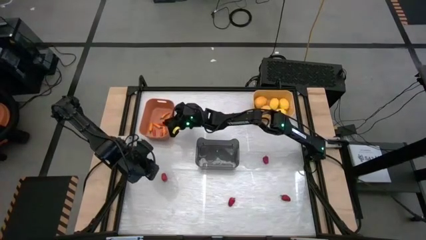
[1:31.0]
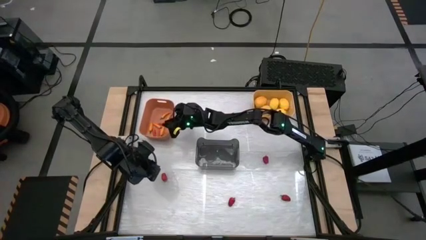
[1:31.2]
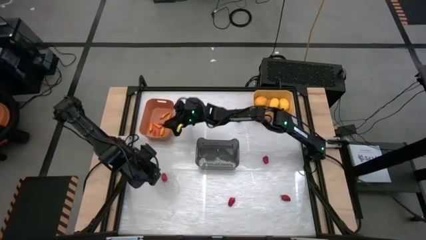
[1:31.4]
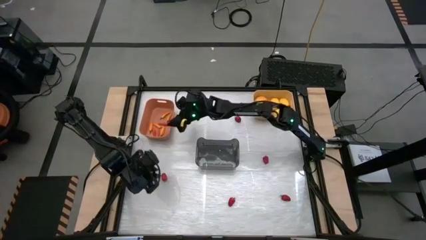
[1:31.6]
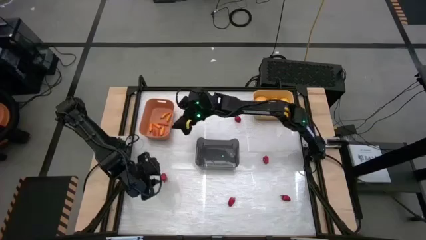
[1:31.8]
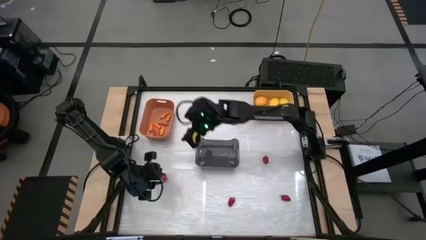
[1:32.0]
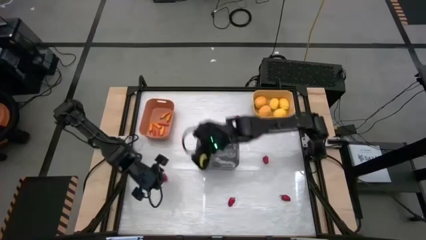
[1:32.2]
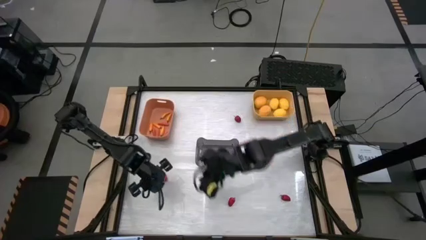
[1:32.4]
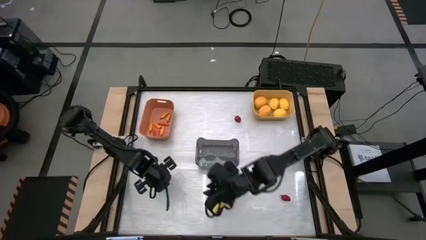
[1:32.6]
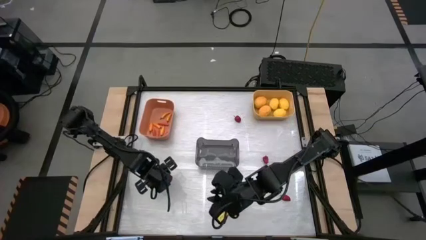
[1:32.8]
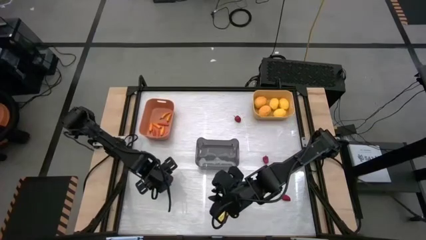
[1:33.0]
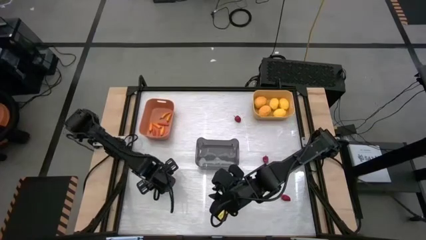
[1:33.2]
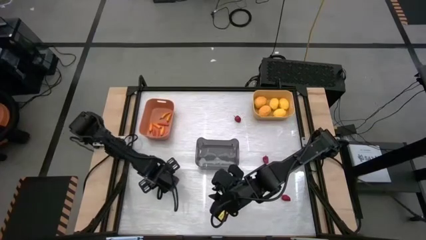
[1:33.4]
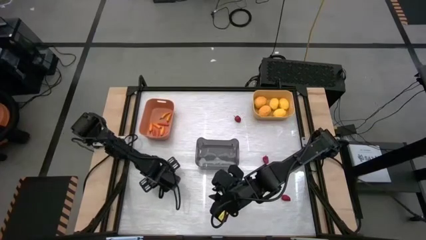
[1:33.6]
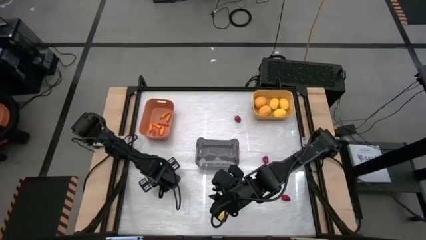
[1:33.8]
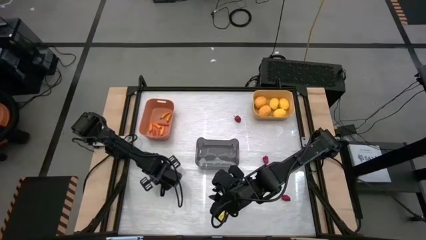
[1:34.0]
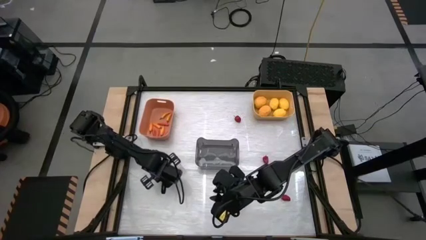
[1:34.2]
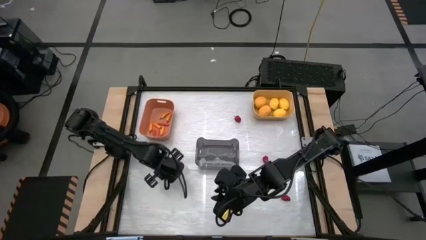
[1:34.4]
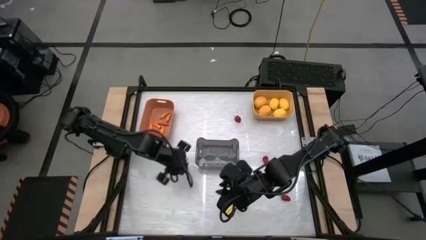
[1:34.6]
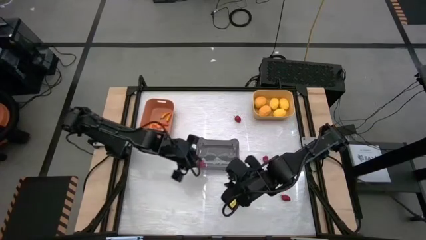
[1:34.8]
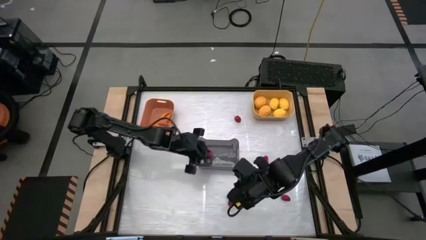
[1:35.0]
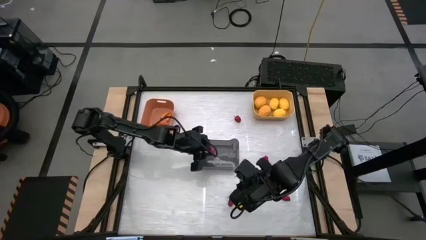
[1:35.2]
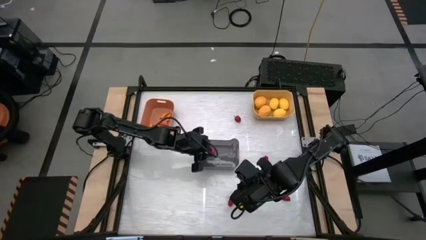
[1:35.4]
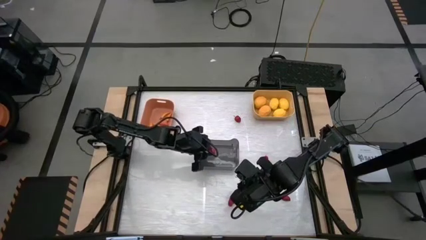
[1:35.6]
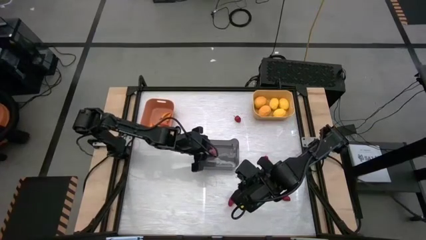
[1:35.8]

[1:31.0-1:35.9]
Task: Sort produce into baskets
Put the red bell pepper into the gray bin

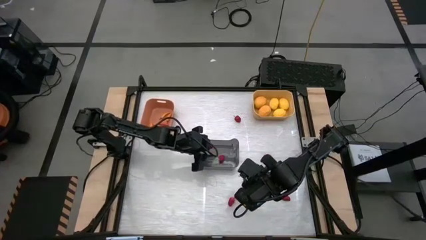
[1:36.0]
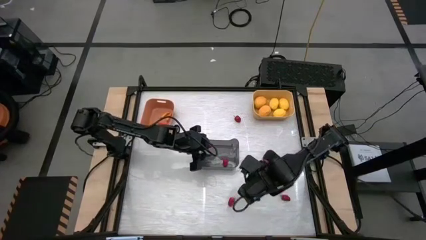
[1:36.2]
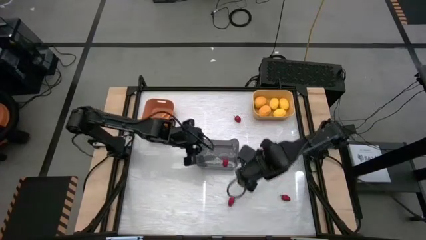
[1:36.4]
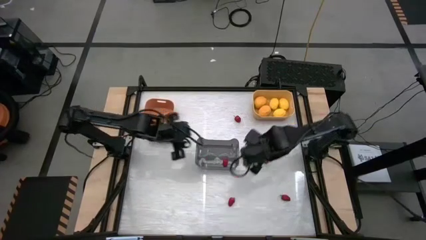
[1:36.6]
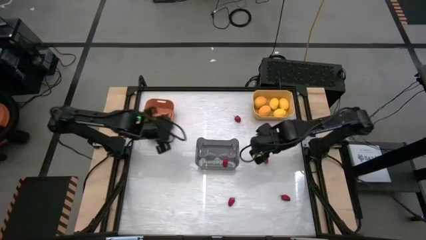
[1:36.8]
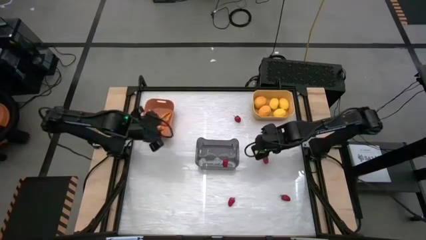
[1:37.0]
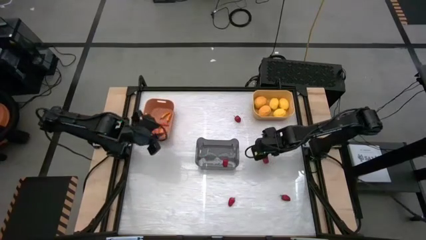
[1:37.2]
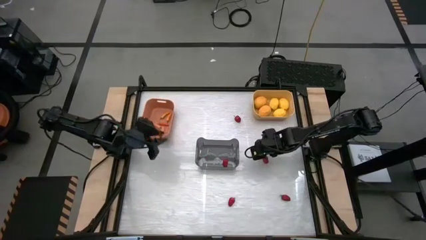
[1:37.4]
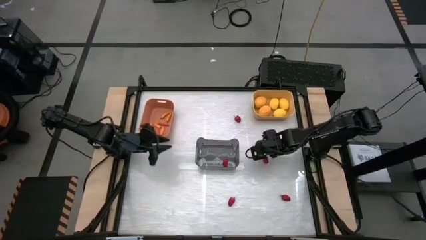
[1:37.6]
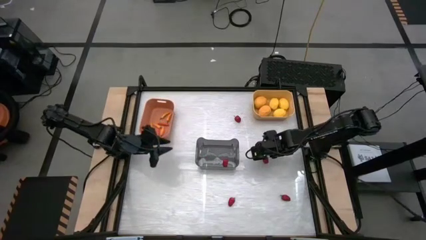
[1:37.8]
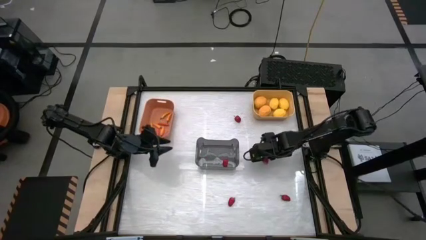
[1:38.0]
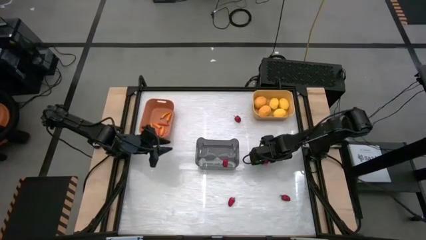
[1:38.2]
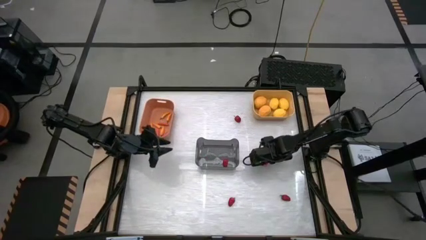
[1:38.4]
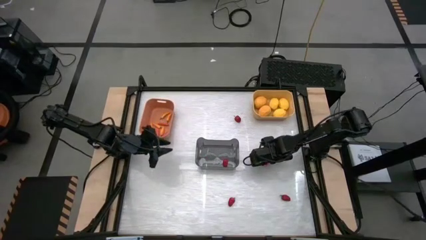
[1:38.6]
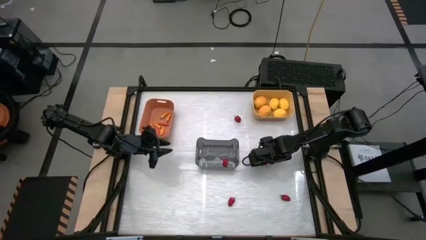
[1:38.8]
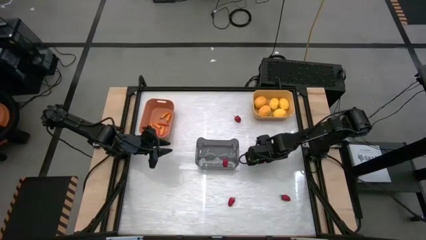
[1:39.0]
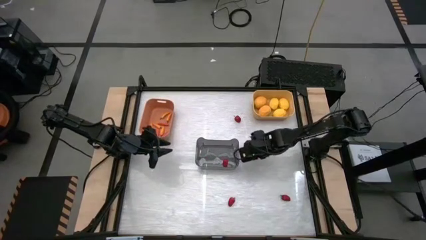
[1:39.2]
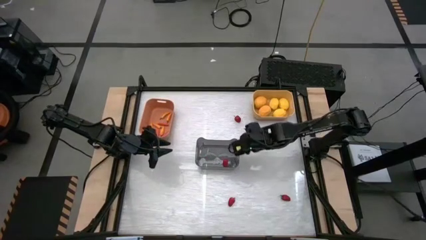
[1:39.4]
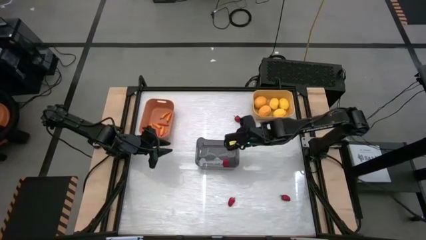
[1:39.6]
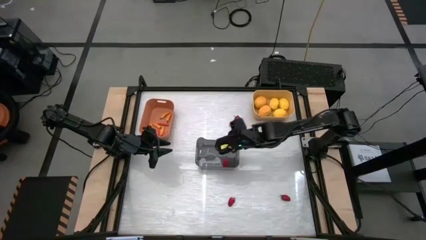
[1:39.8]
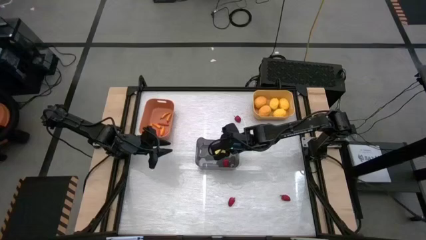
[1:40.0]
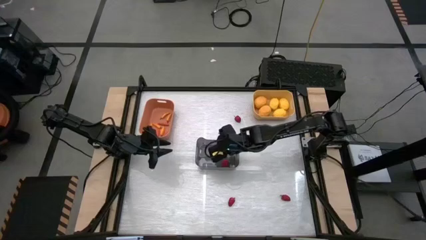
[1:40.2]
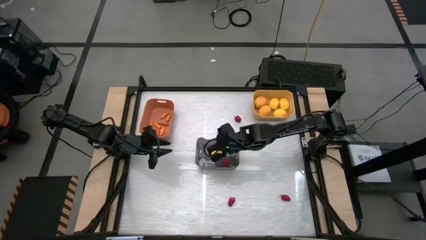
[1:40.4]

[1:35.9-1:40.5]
Put the red bell pepper into the gray bin

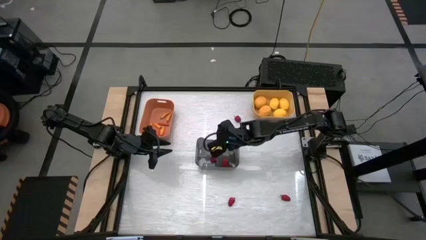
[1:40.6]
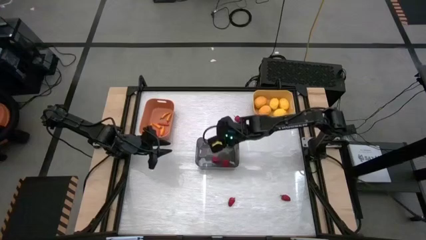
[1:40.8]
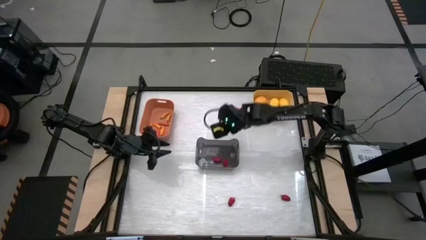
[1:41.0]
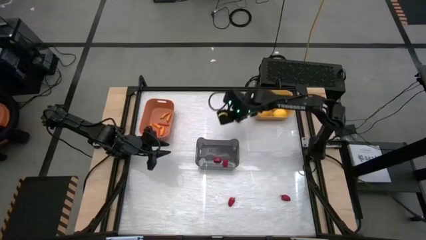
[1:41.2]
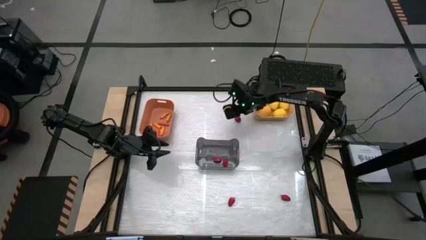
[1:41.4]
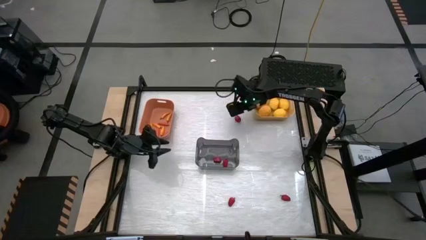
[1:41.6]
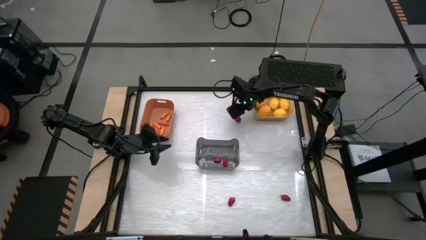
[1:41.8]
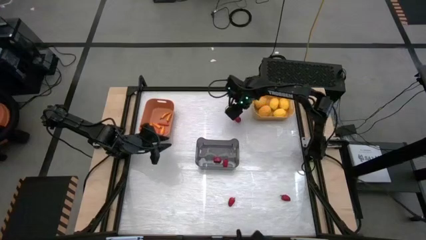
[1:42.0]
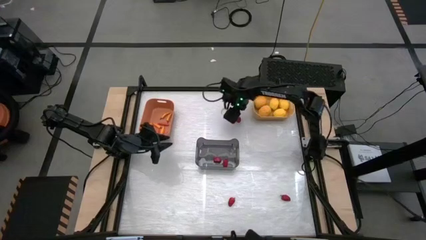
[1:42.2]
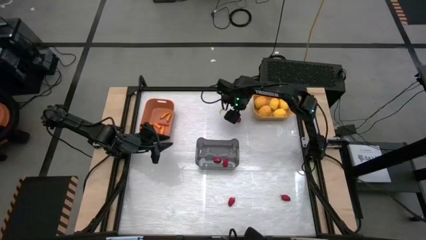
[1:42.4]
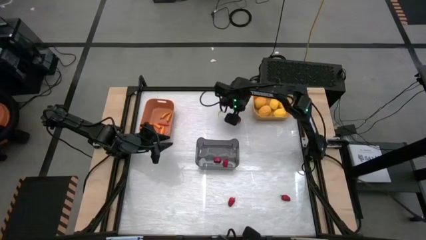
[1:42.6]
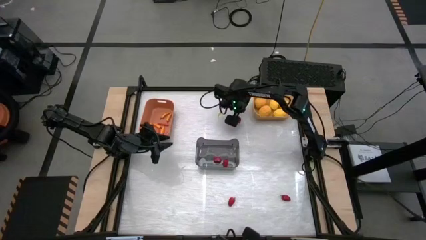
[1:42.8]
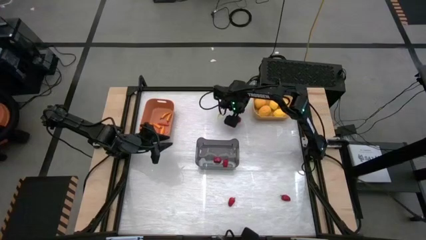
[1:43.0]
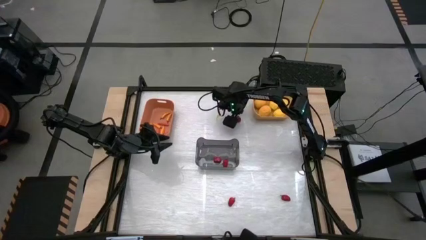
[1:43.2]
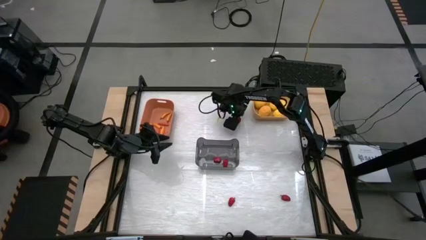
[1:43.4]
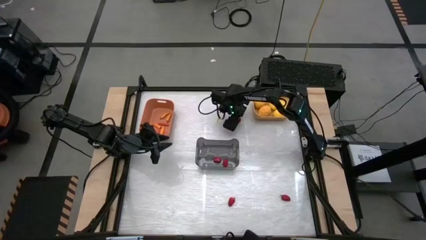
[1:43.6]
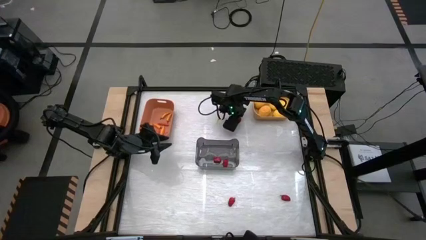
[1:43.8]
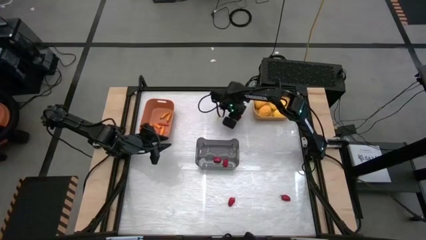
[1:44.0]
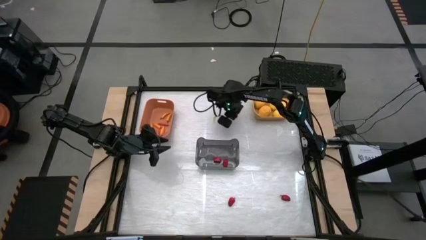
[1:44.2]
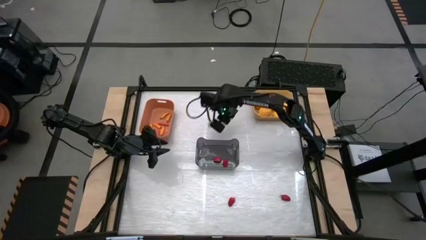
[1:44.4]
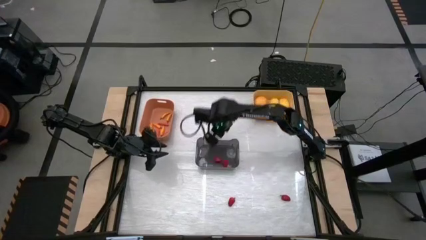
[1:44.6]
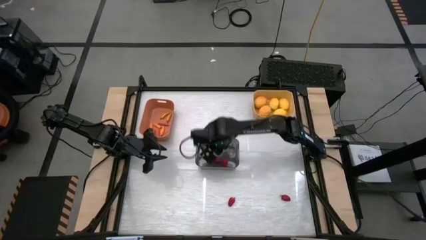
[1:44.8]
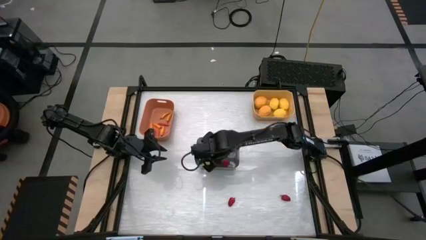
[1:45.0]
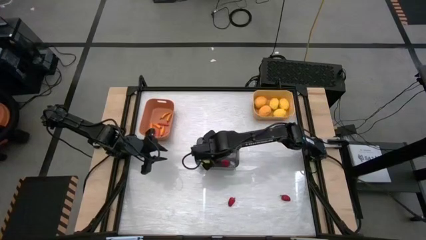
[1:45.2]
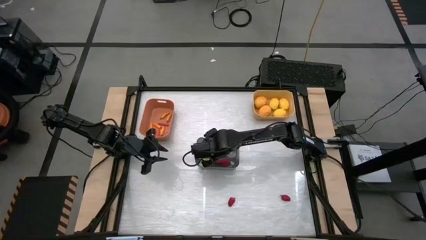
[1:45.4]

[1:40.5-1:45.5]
Put the red bell pepper into the gray bin

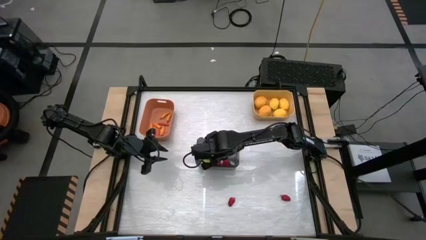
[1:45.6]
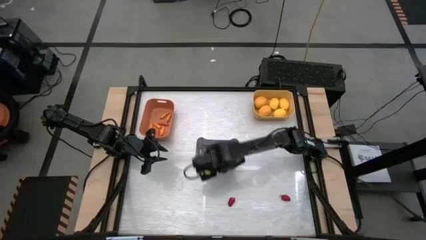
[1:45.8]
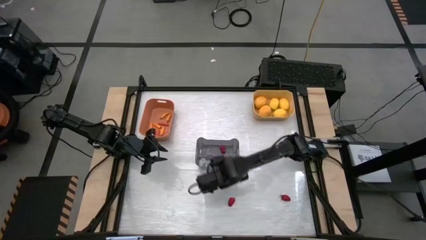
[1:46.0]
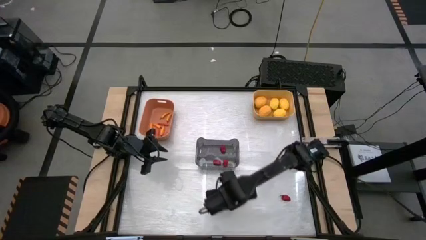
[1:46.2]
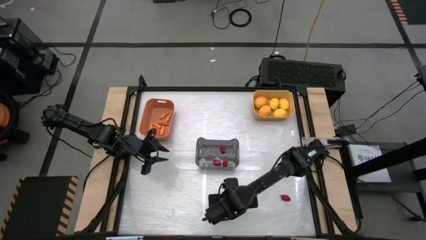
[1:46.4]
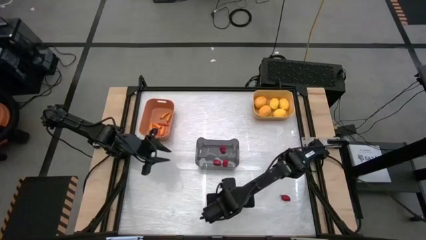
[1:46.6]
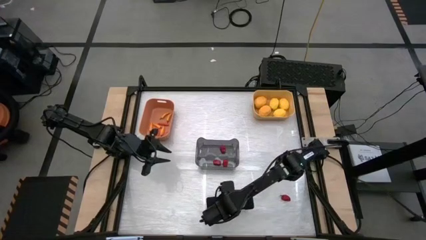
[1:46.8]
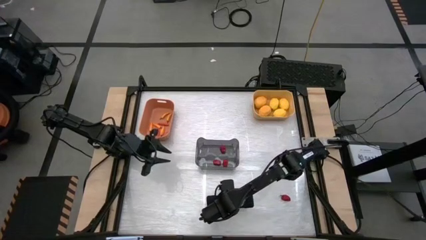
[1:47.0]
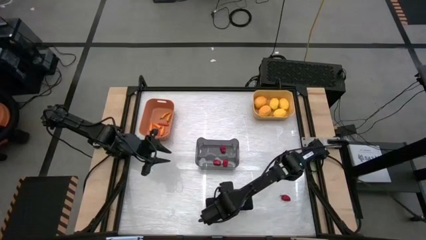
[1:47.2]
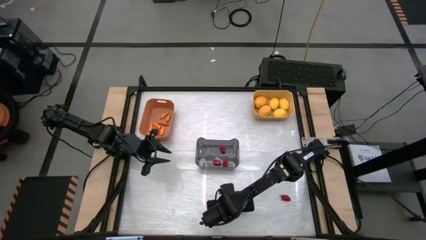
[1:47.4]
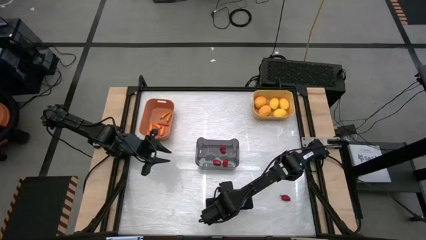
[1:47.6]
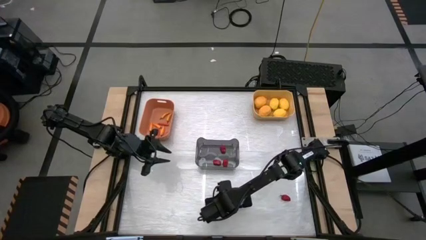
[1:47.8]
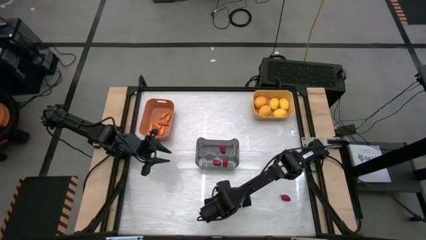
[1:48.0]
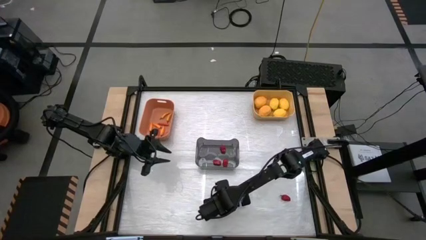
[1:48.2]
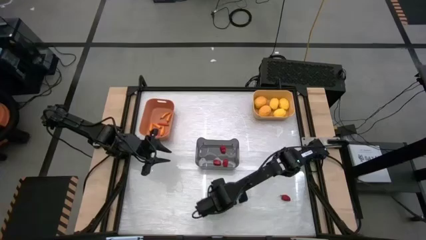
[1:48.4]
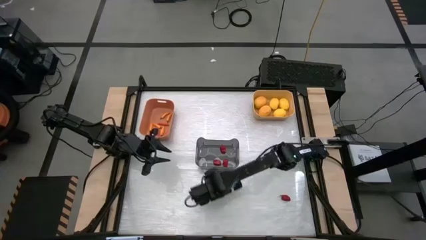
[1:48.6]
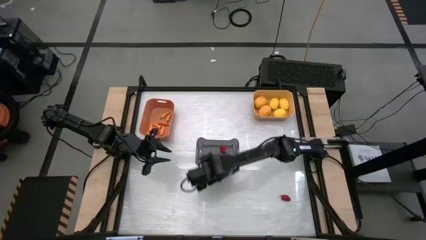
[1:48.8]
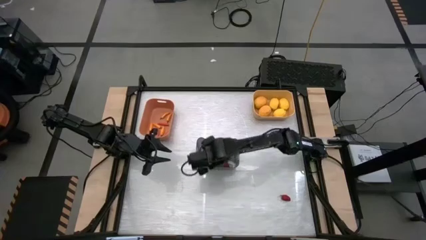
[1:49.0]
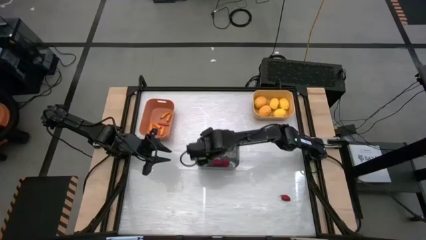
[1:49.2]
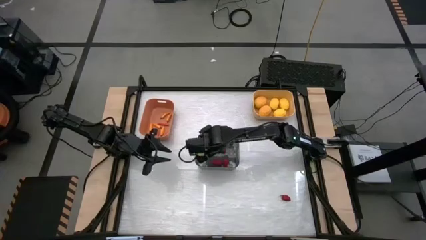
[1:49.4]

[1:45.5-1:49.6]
Put the red bell pepper into the gray bin
